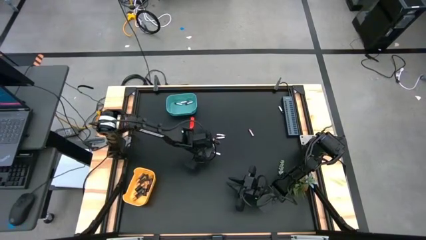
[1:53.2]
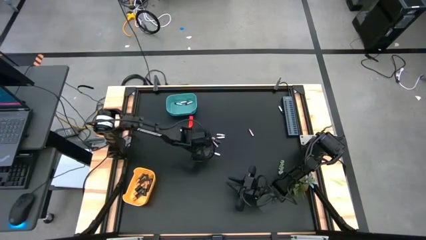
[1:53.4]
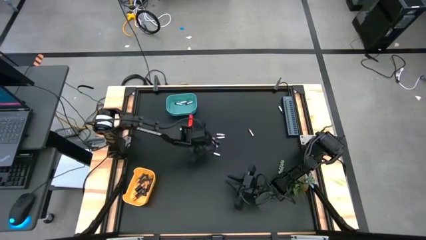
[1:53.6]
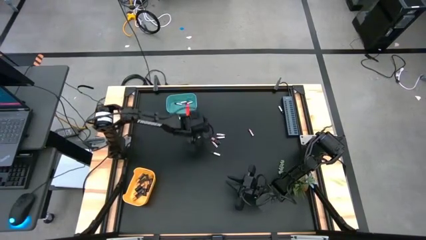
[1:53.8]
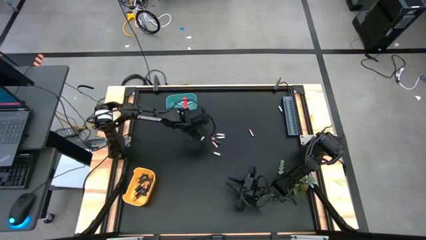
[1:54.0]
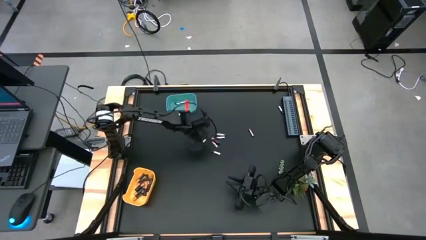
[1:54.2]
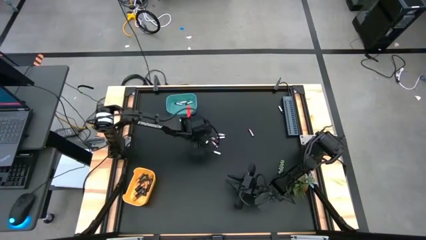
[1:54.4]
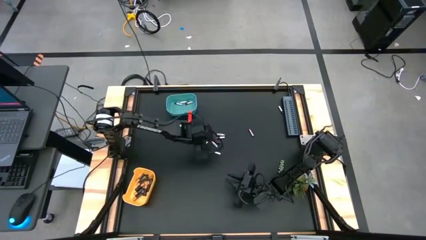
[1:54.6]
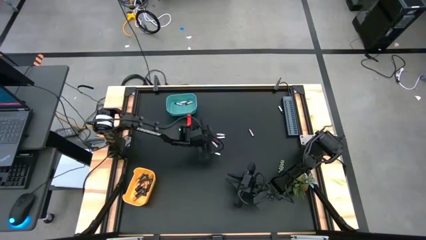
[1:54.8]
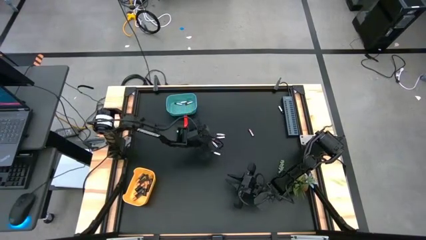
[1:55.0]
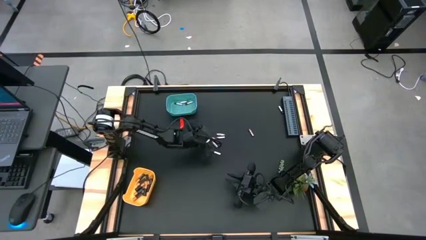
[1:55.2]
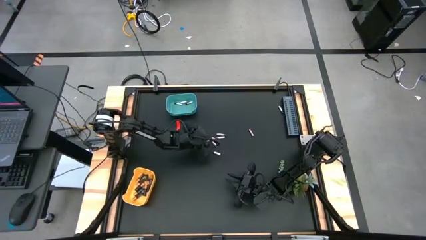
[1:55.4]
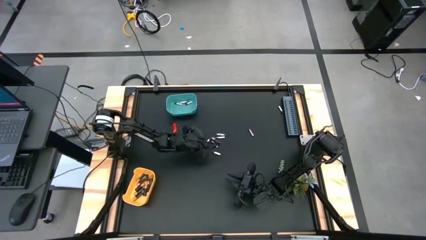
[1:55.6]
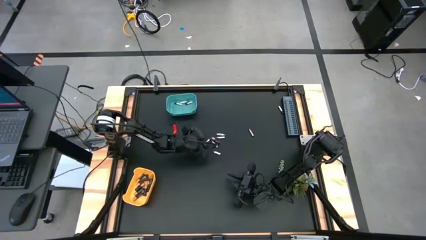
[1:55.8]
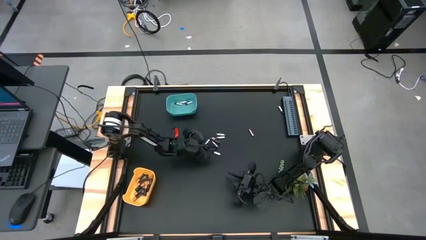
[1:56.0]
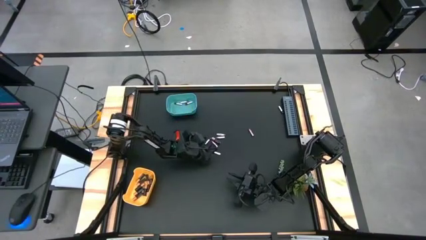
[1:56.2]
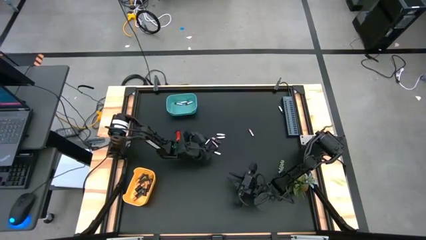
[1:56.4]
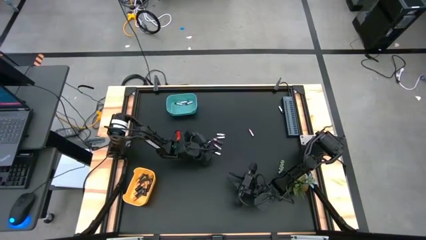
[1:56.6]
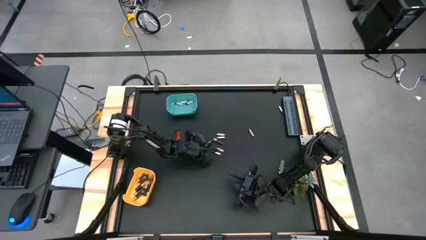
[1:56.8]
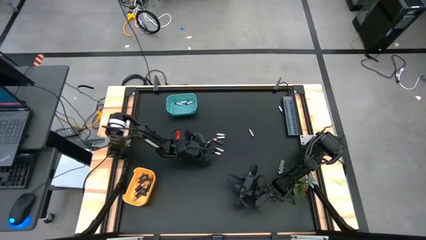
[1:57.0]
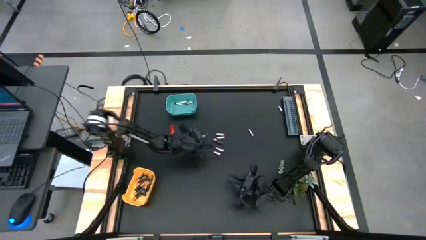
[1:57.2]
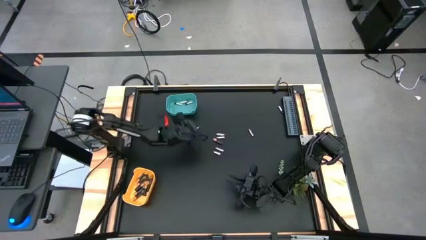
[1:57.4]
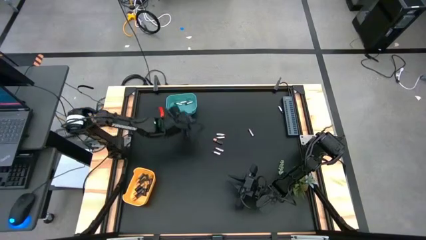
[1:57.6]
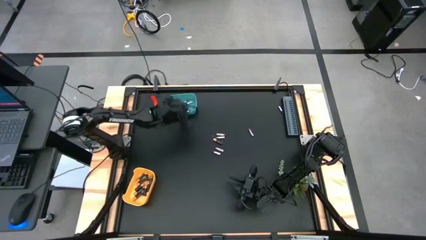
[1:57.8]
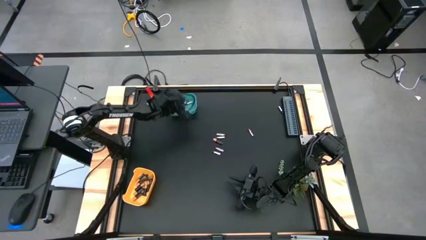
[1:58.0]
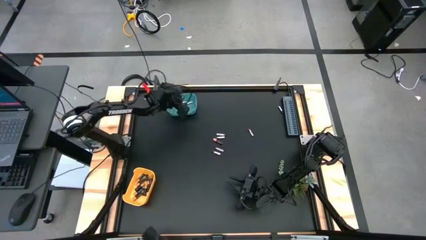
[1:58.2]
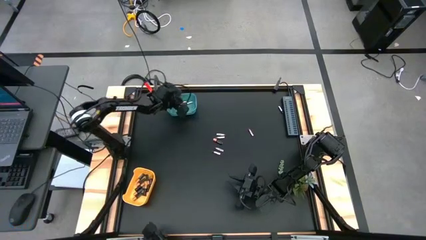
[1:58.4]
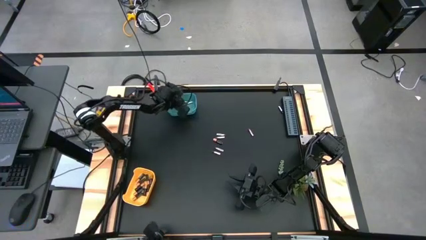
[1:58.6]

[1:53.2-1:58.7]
Task: Sort batteries
Put the silver battery into the green bin

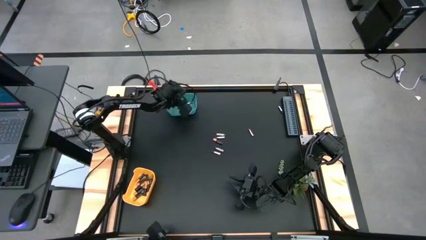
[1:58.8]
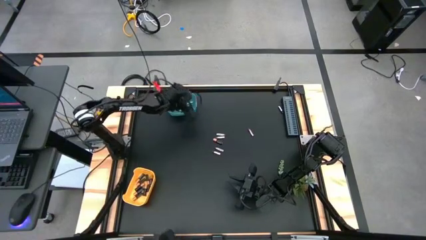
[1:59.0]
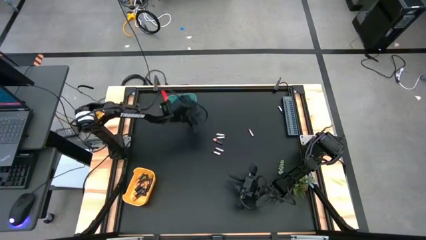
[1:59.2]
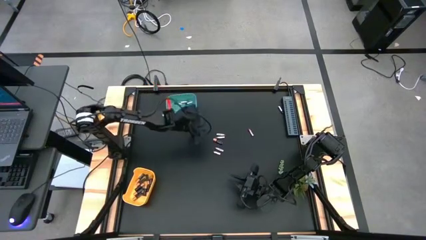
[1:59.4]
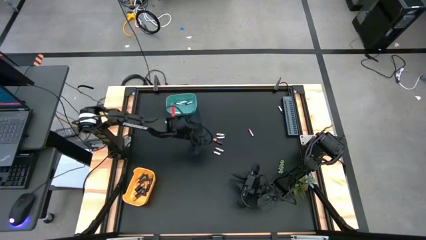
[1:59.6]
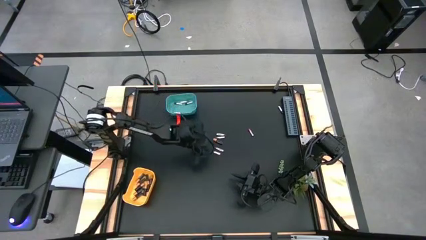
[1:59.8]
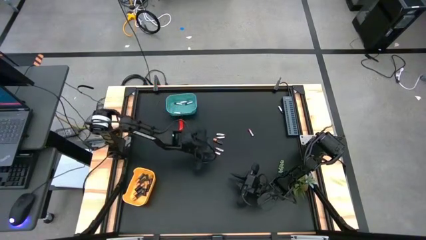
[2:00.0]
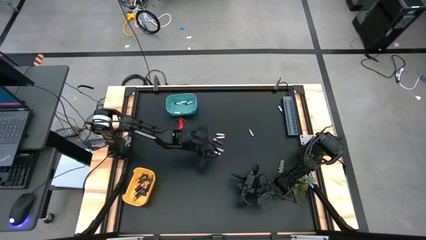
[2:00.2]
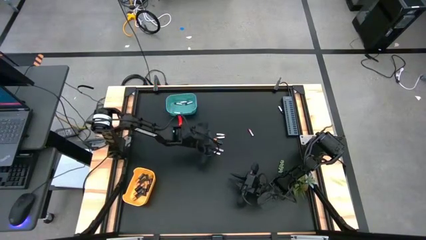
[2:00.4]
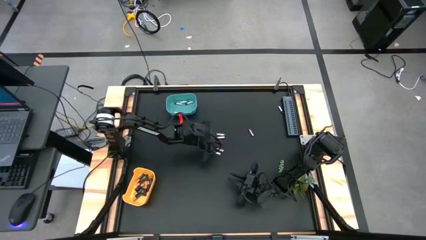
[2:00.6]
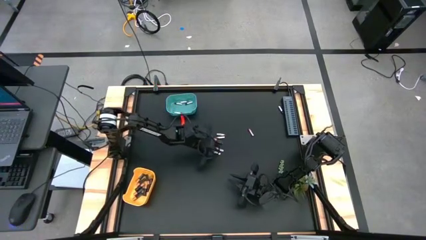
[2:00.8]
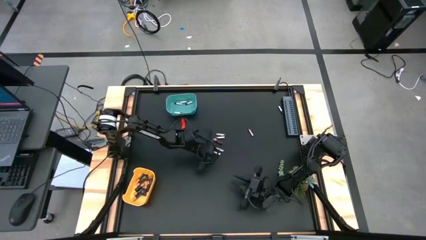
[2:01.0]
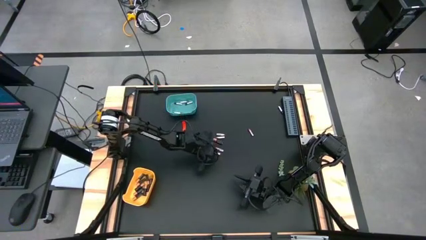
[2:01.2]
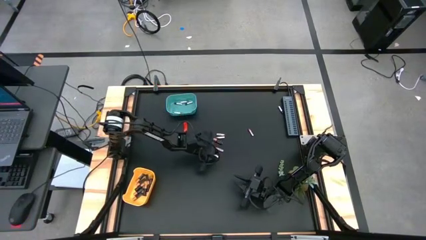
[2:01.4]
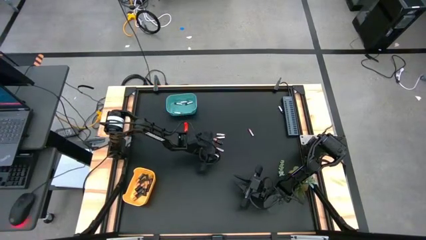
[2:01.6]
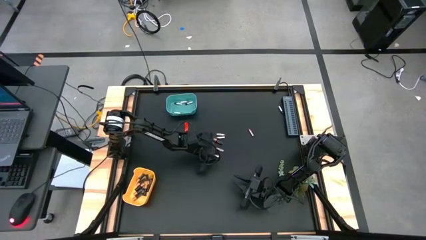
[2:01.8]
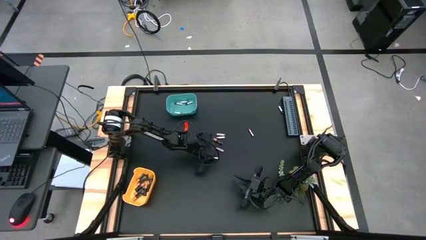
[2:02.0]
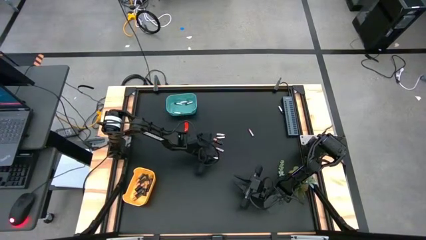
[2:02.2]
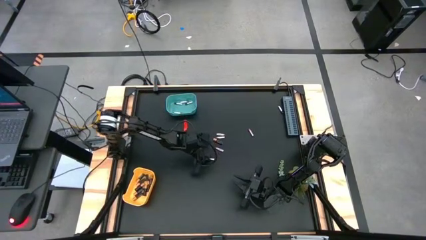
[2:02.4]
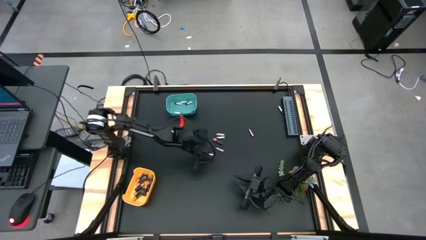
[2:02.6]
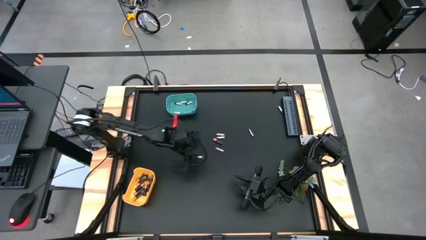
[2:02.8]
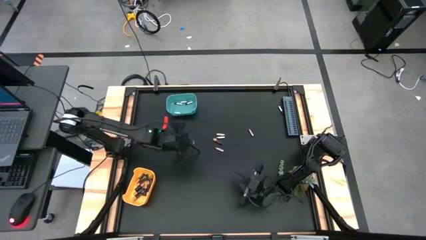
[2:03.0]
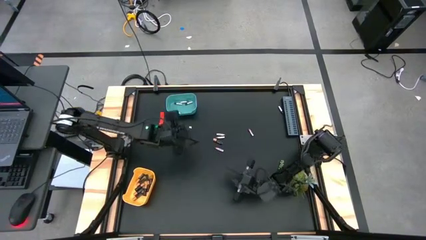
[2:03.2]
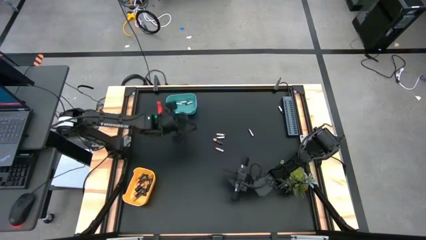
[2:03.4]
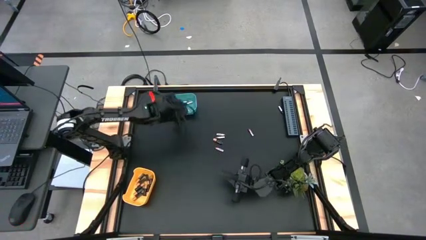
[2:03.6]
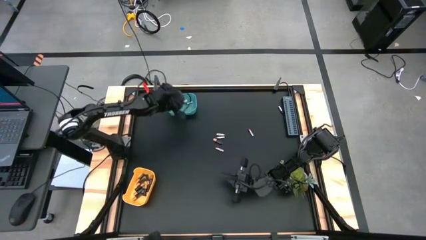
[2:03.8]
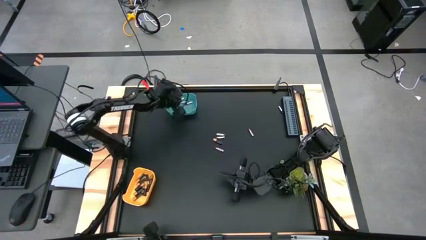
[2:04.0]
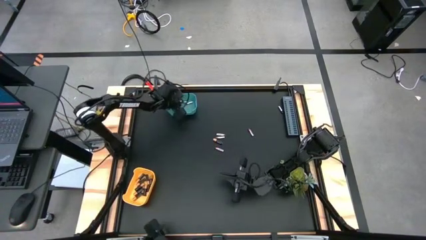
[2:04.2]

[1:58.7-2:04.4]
Put the silver battery into the green bin

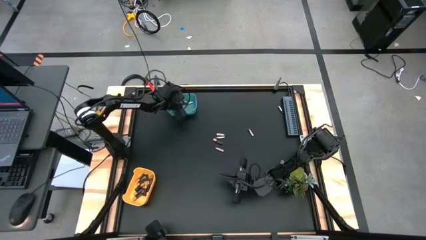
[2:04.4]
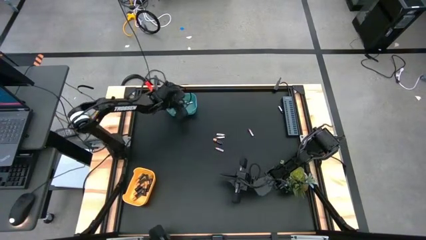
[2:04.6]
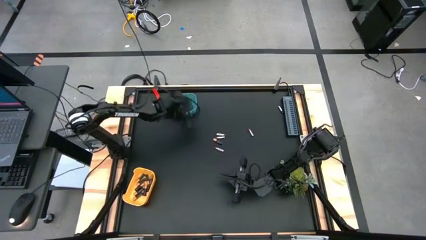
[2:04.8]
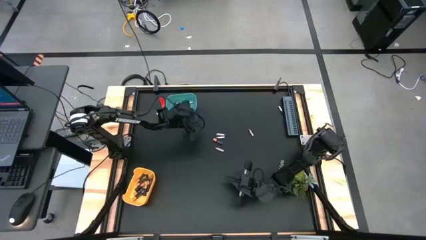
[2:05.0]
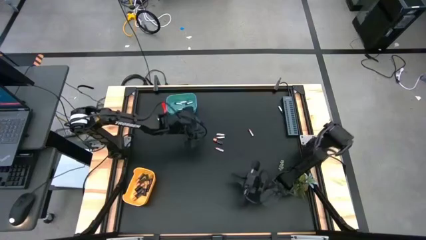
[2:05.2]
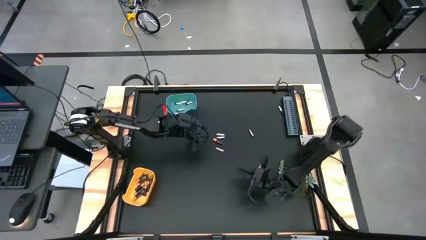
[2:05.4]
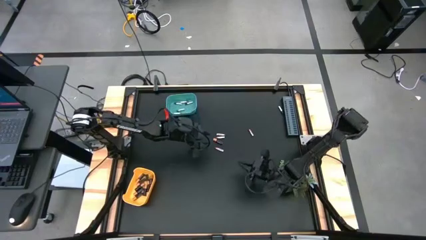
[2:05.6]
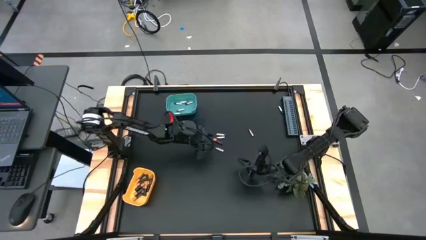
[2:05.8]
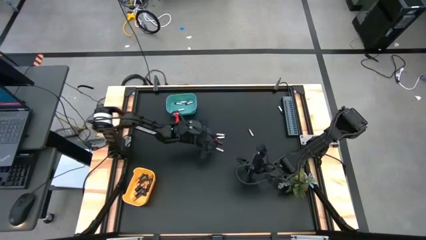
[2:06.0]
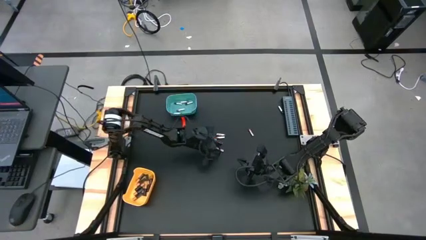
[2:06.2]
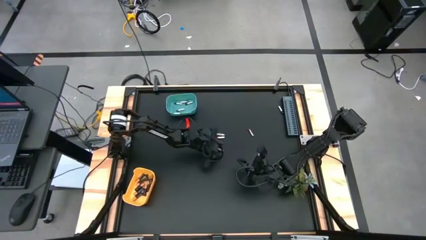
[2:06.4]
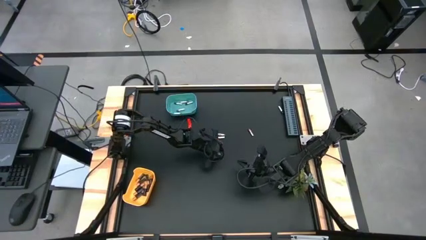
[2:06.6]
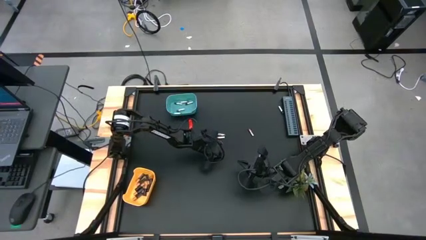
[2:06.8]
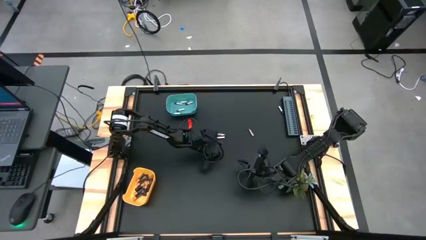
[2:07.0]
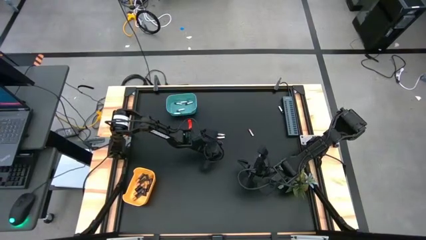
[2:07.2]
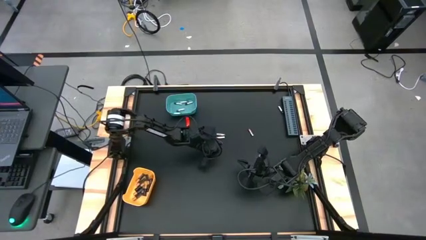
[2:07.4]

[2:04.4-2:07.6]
Put the silver battery into the green bin

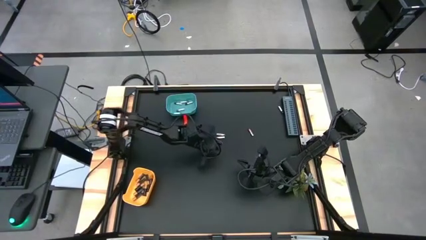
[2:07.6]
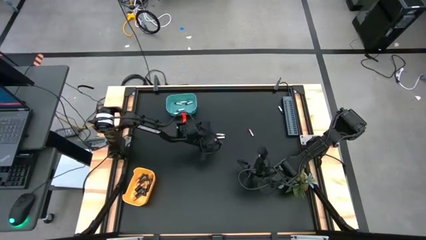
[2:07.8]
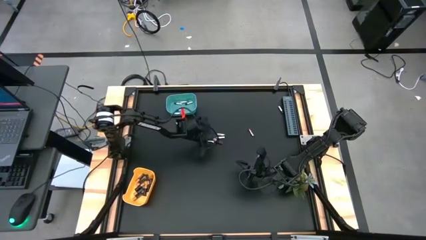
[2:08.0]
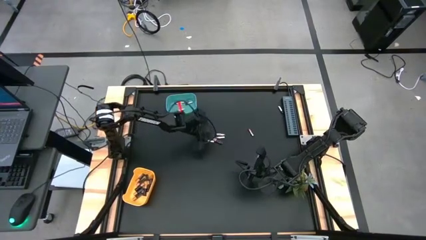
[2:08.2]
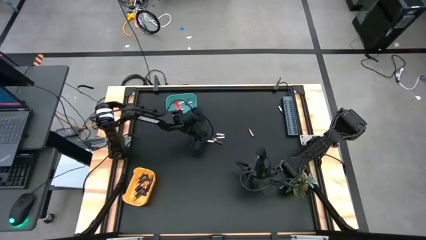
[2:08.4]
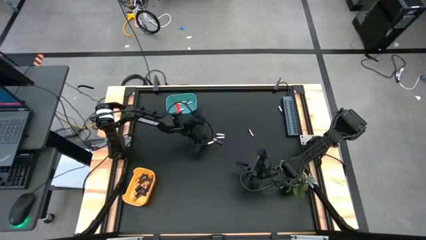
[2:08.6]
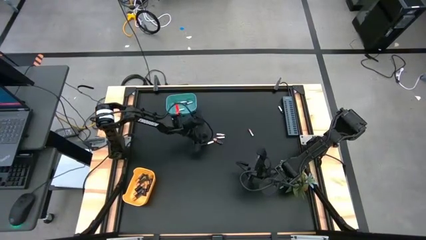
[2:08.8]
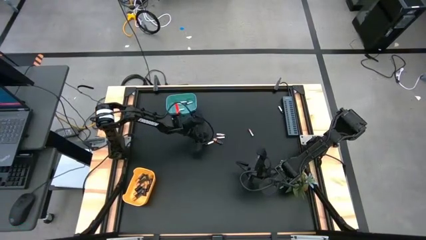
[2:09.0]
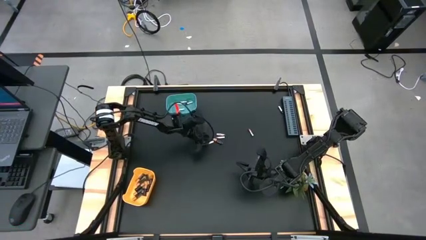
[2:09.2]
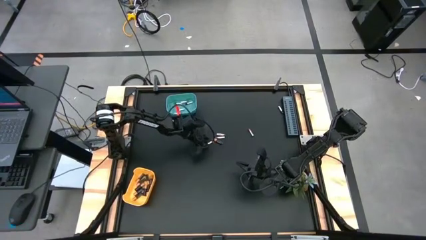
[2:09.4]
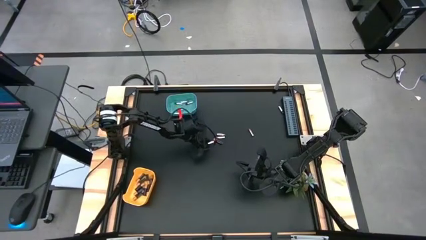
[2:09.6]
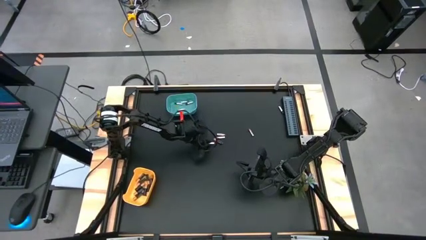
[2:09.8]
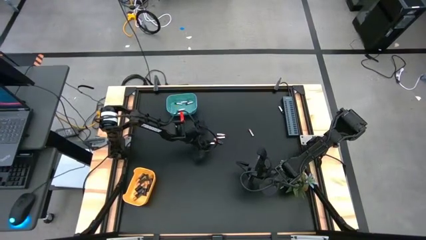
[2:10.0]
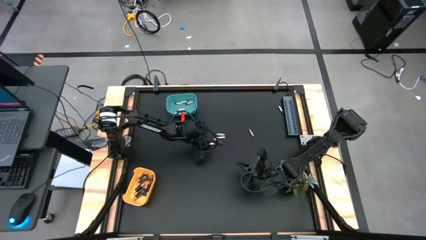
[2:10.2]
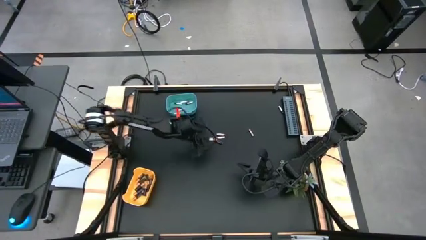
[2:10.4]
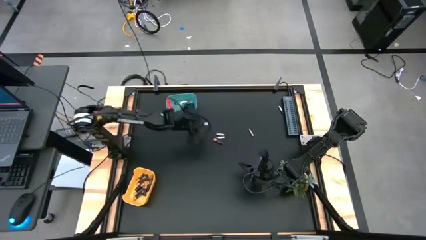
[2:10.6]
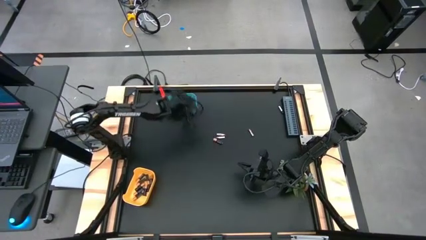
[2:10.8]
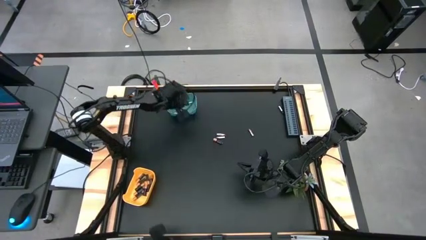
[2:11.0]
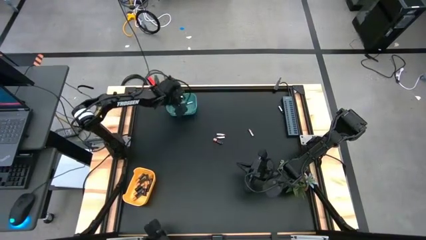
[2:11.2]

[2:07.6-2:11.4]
Put the silver battery into the green bin
